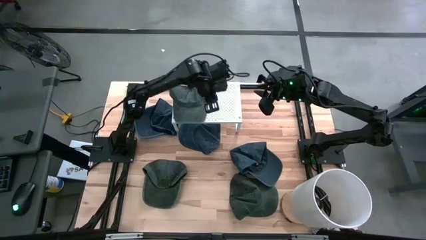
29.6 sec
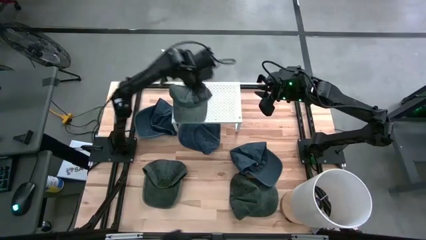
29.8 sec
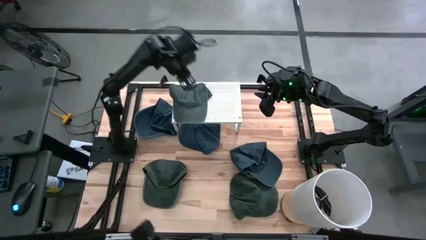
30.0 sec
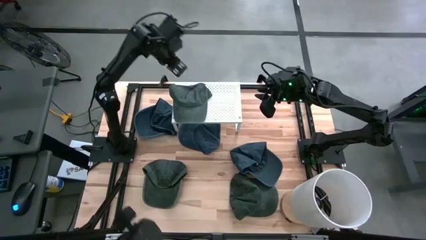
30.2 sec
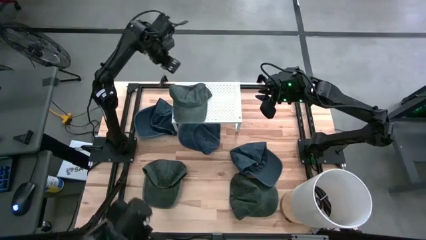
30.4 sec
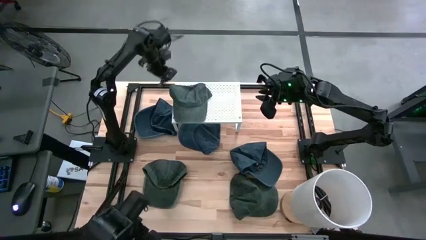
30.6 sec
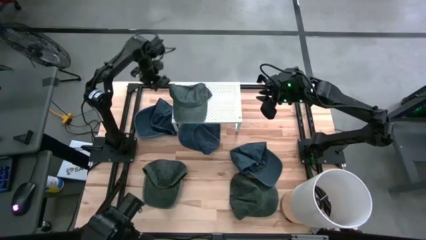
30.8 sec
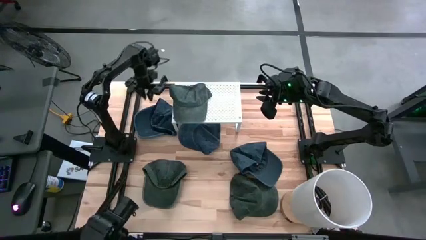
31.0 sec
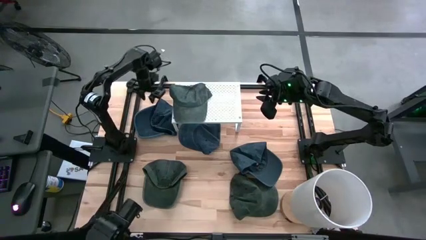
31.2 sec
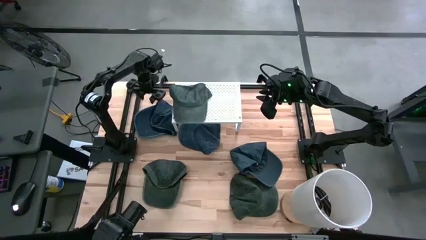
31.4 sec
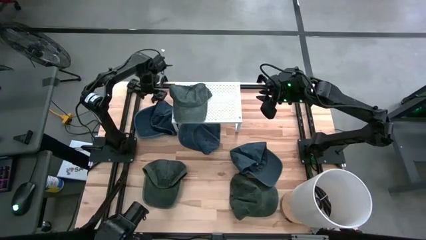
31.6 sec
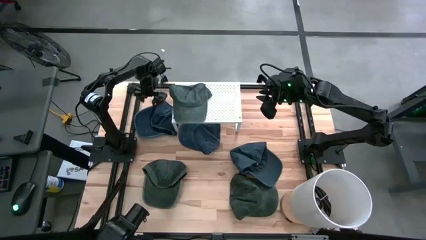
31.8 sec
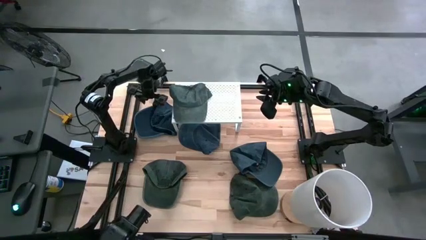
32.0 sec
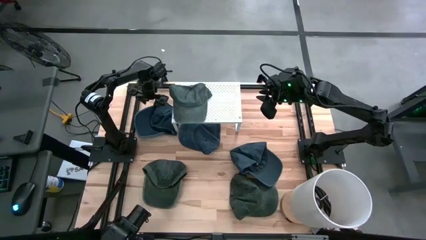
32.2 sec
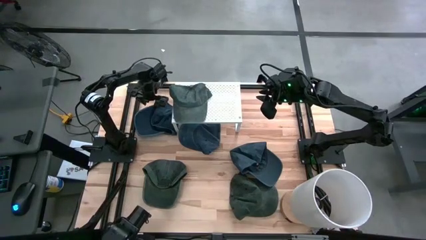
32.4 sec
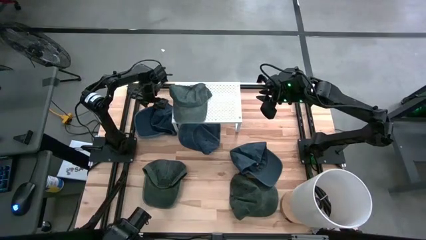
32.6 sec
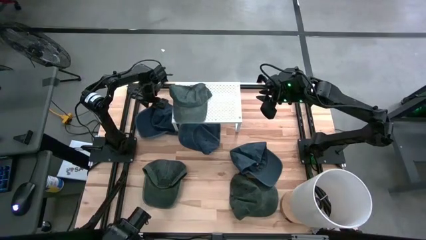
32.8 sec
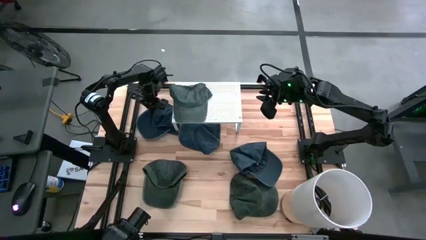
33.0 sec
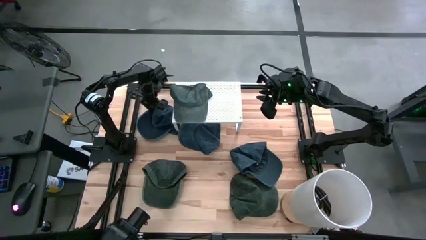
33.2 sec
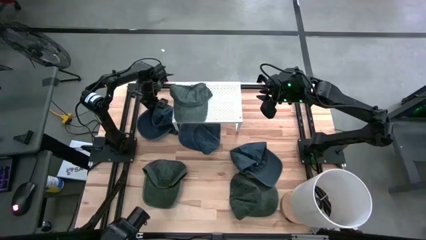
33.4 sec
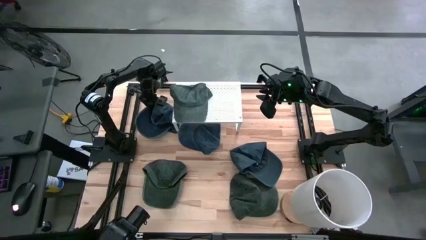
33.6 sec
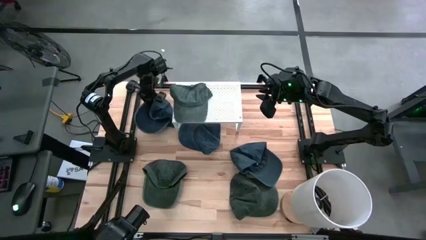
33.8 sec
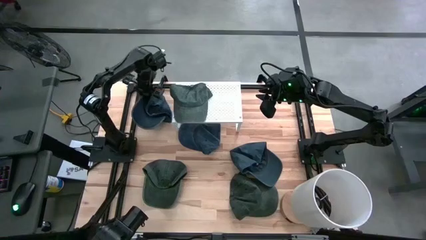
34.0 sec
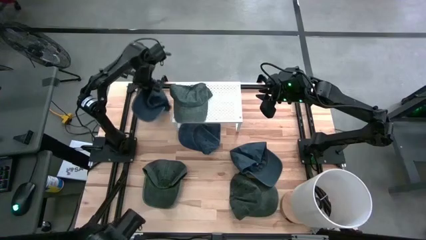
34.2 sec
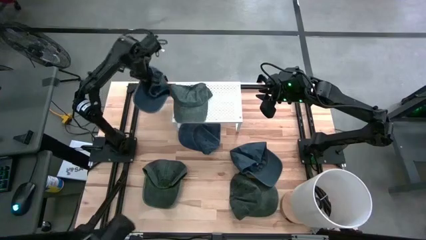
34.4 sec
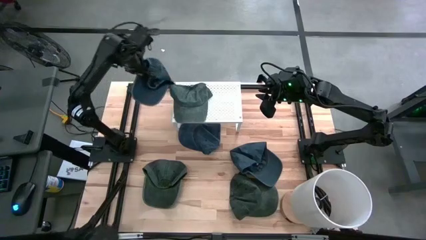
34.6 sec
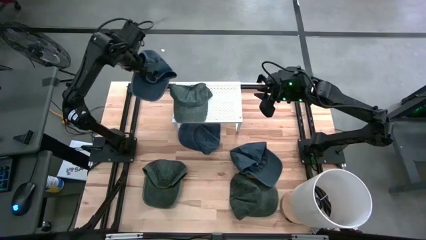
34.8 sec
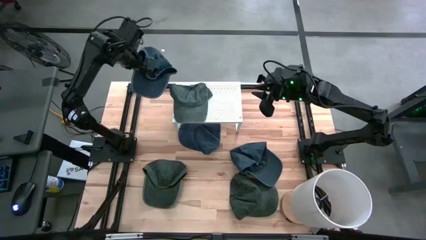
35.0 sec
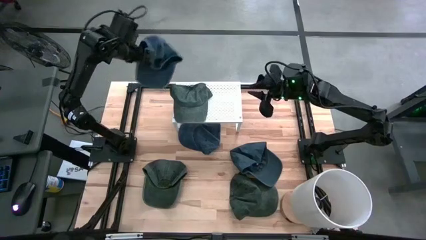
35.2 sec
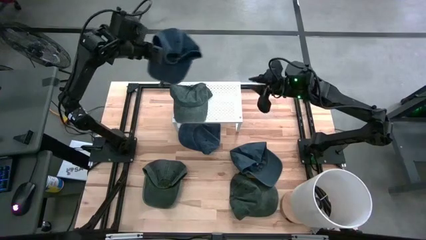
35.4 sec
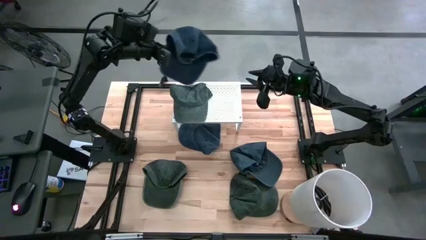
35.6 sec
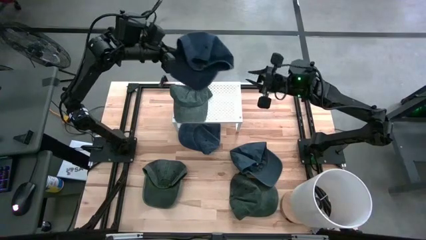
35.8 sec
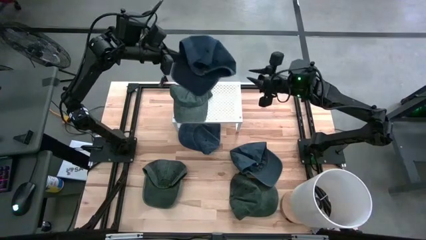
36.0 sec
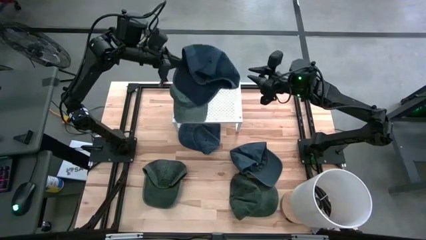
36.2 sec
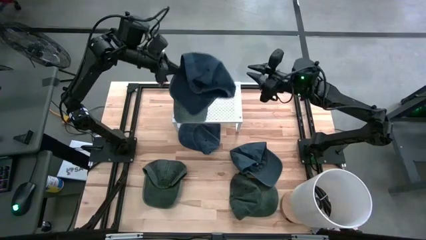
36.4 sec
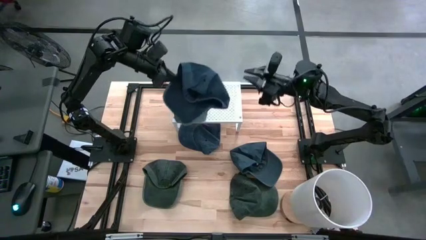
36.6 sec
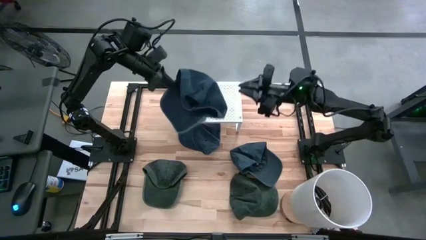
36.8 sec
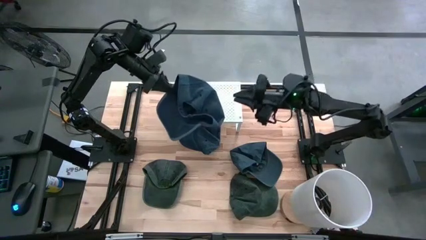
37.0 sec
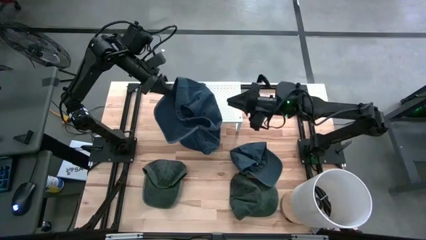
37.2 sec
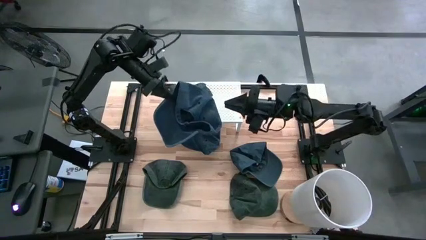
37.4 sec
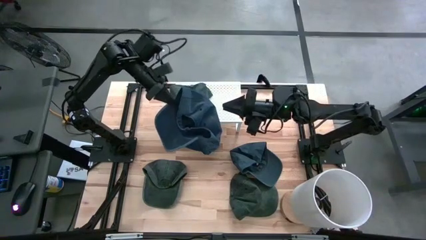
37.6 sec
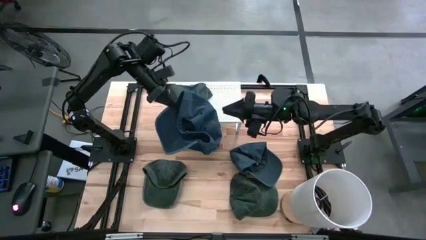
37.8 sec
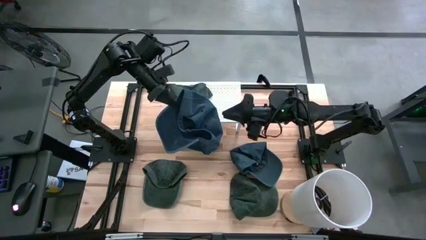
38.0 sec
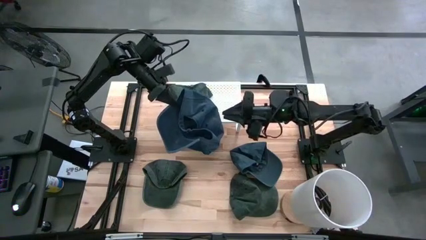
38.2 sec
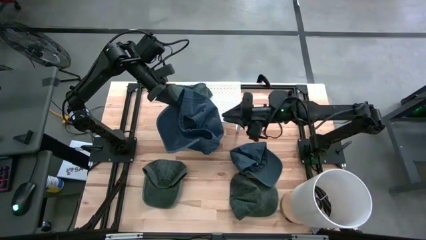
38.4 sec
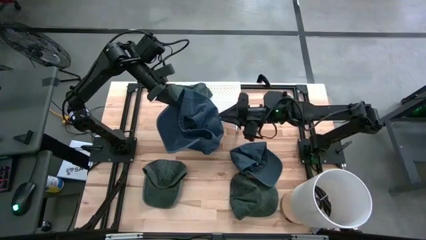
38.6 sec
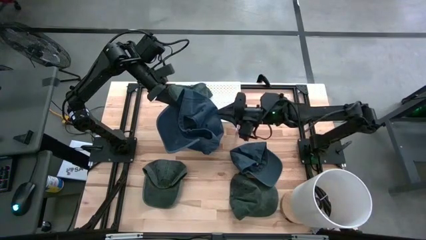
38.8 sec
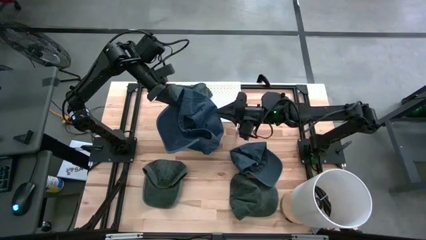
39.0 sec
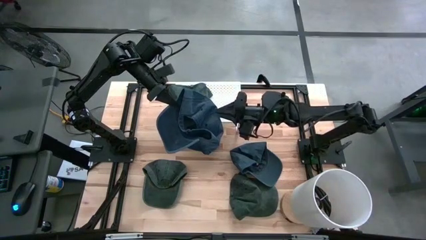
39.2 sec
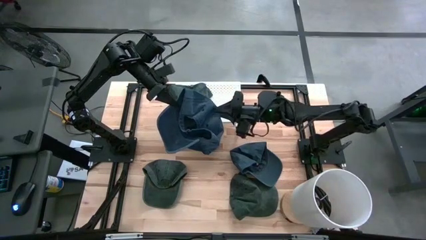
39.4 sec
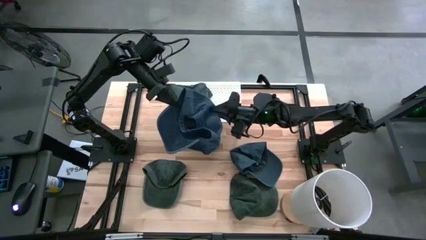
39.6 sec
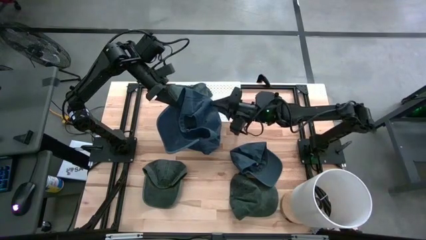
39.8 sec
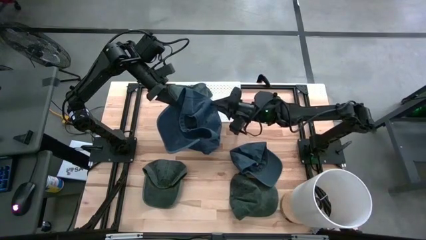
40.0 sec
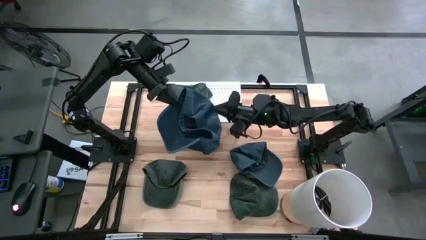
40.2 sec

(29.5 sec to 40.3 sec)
Task: Pick & Place hat
Put the left blue cap on the shelf
